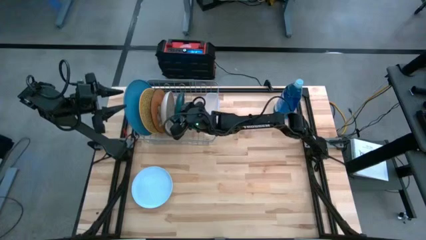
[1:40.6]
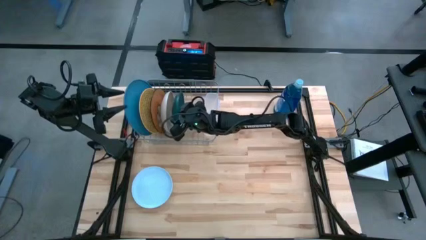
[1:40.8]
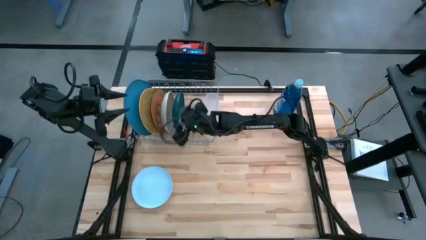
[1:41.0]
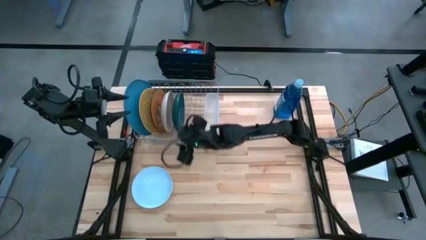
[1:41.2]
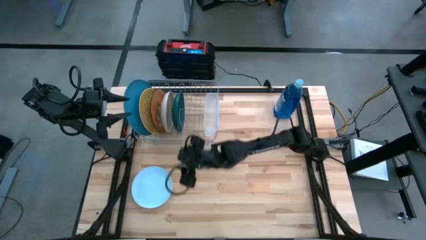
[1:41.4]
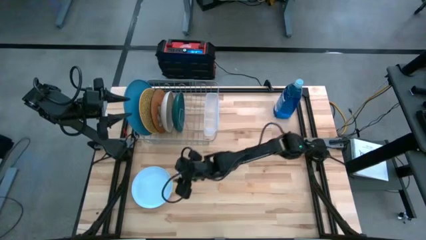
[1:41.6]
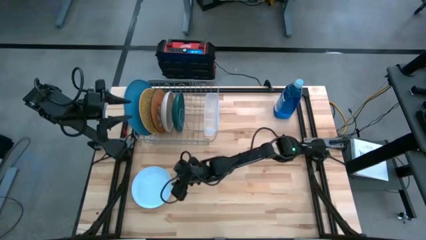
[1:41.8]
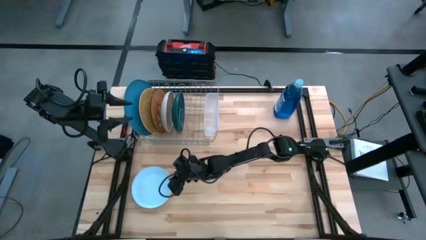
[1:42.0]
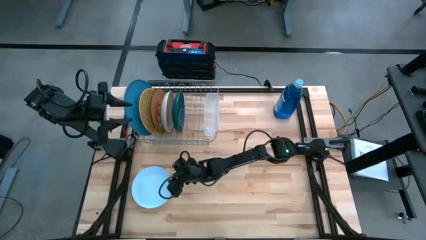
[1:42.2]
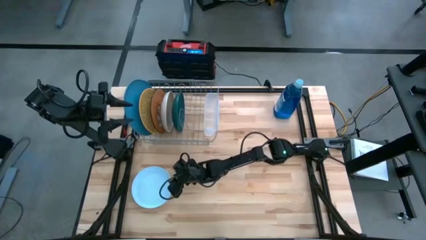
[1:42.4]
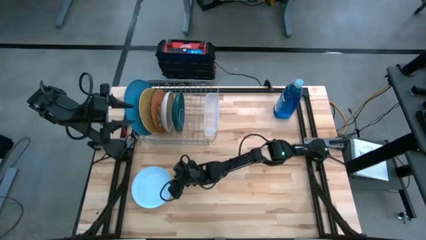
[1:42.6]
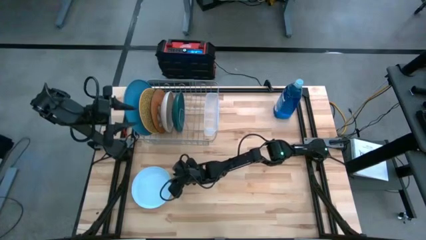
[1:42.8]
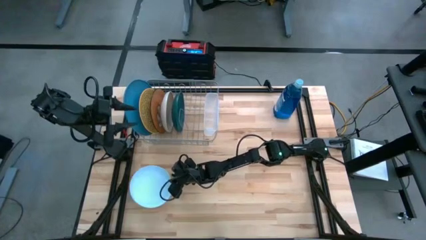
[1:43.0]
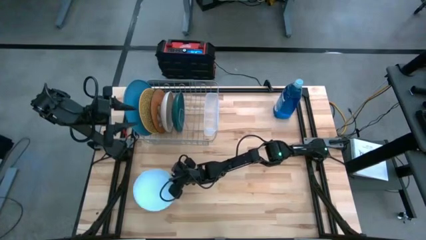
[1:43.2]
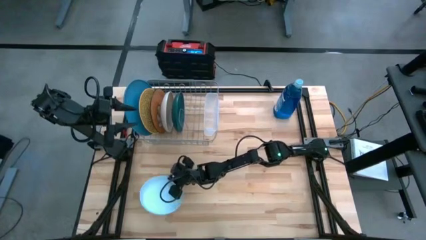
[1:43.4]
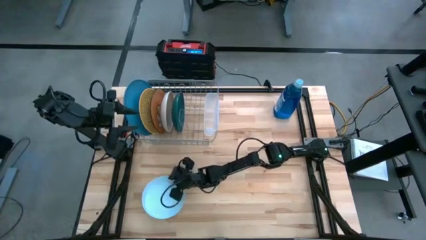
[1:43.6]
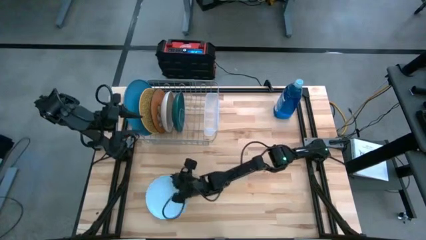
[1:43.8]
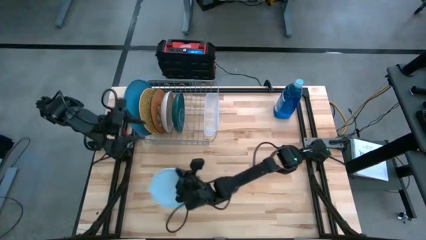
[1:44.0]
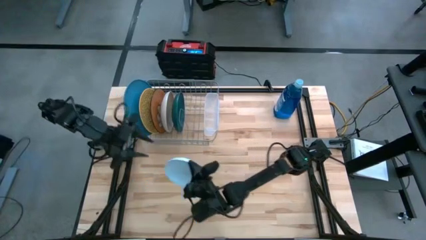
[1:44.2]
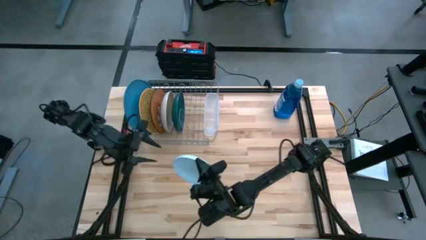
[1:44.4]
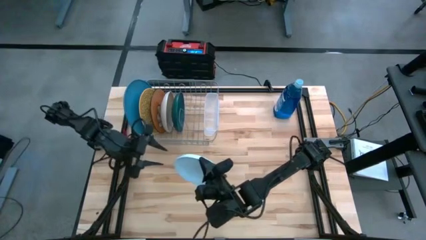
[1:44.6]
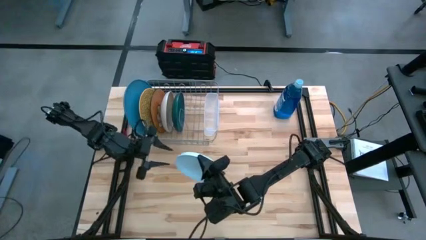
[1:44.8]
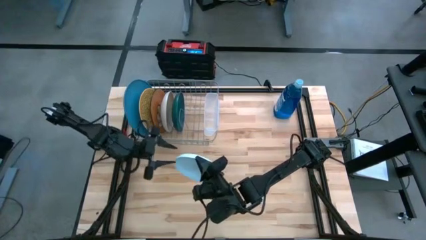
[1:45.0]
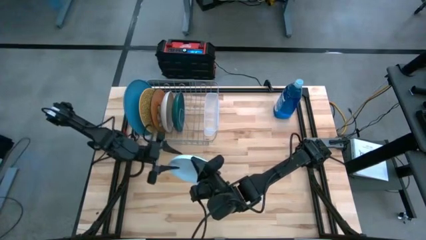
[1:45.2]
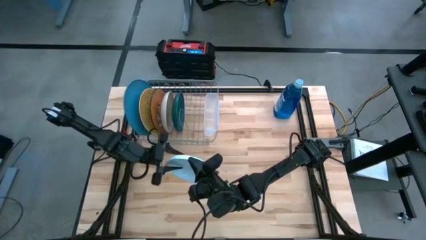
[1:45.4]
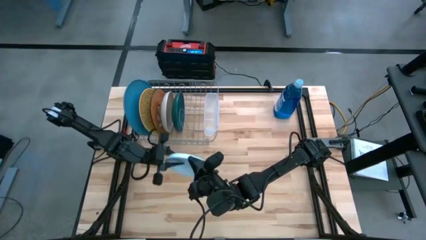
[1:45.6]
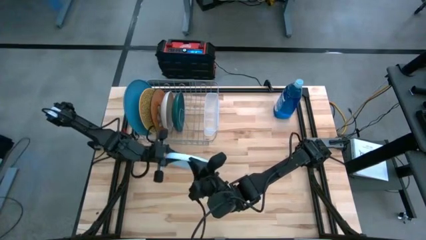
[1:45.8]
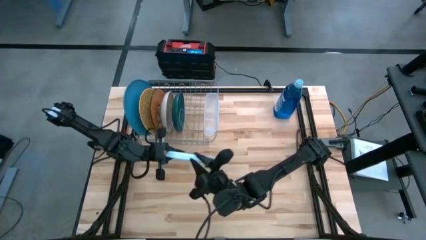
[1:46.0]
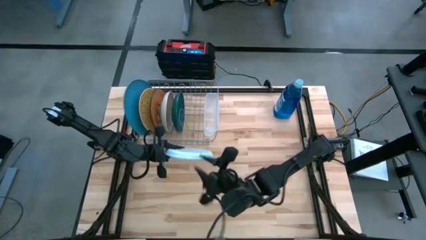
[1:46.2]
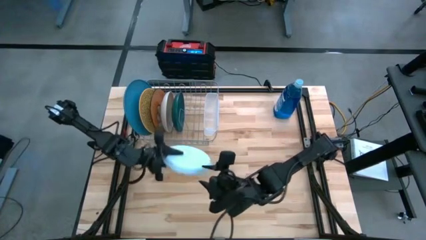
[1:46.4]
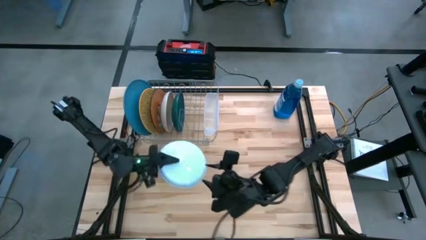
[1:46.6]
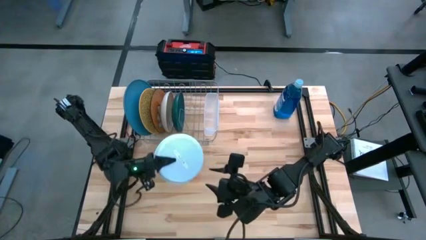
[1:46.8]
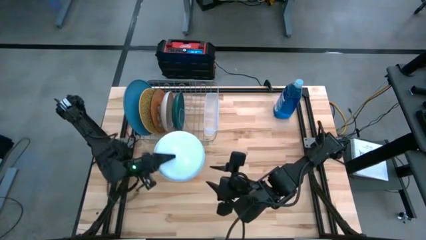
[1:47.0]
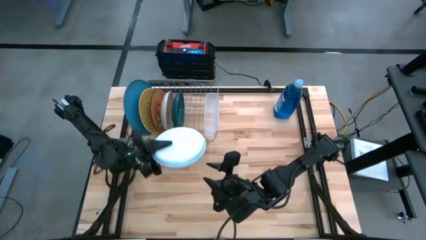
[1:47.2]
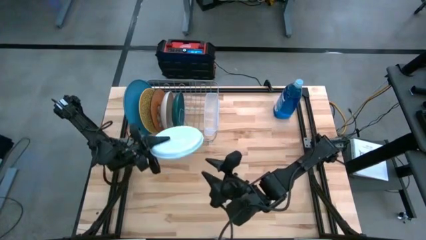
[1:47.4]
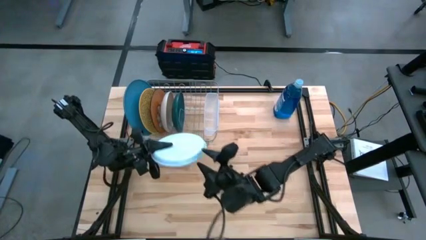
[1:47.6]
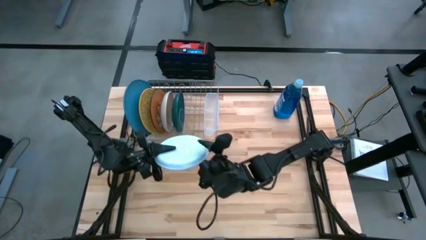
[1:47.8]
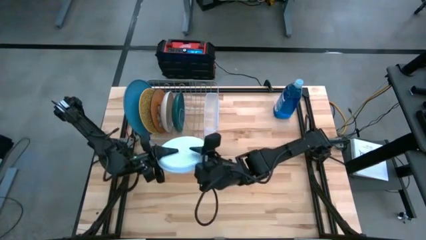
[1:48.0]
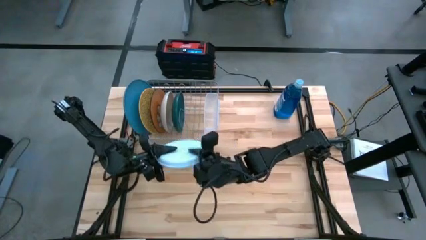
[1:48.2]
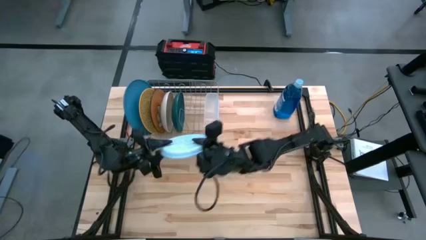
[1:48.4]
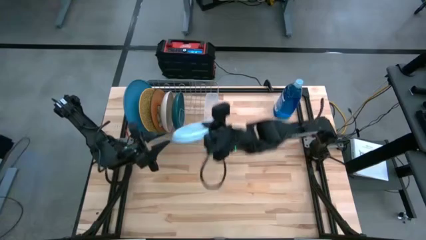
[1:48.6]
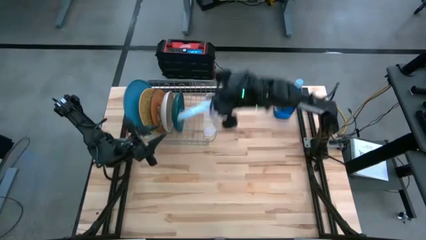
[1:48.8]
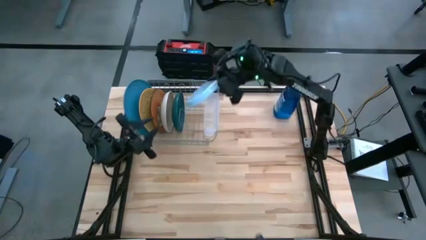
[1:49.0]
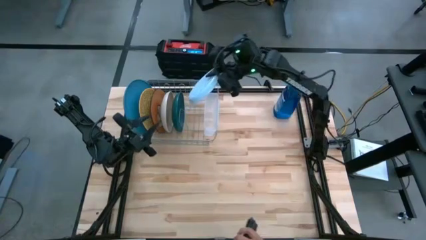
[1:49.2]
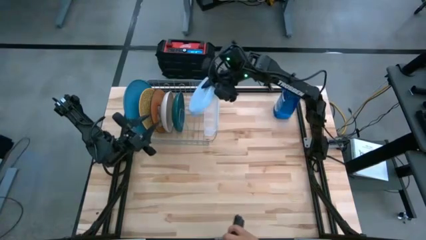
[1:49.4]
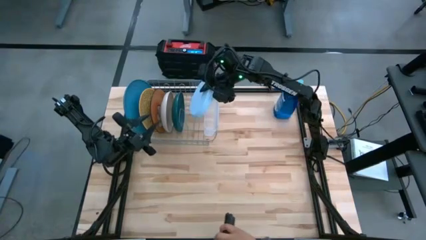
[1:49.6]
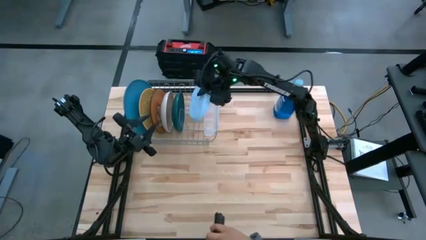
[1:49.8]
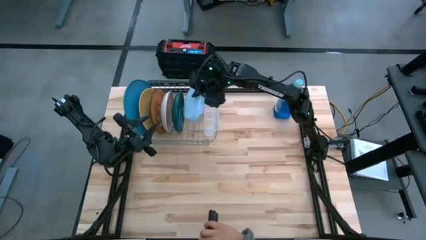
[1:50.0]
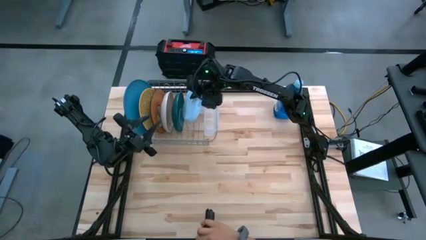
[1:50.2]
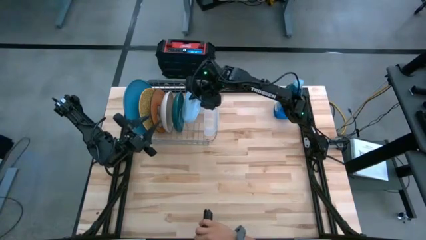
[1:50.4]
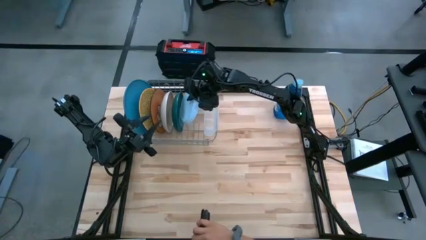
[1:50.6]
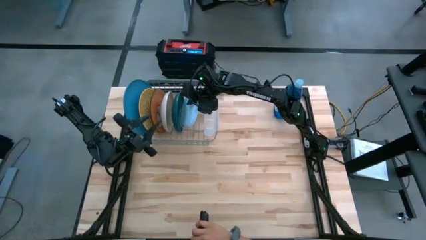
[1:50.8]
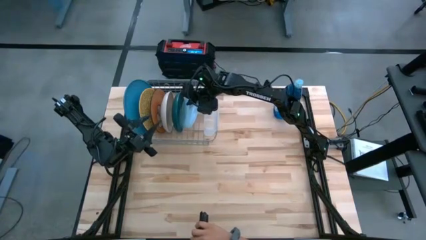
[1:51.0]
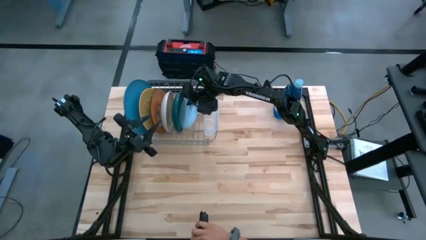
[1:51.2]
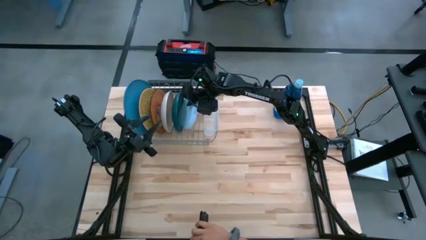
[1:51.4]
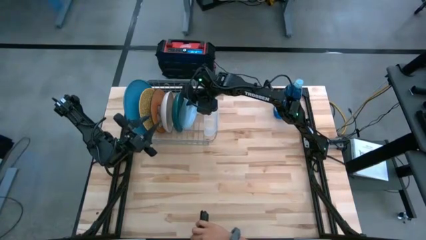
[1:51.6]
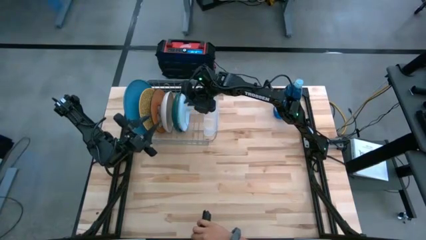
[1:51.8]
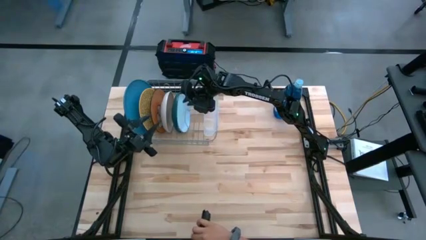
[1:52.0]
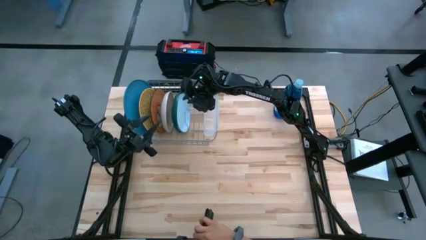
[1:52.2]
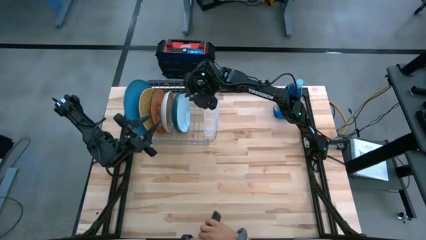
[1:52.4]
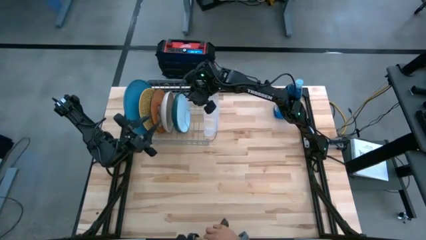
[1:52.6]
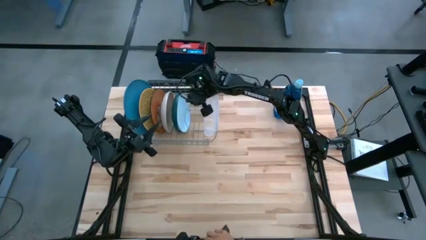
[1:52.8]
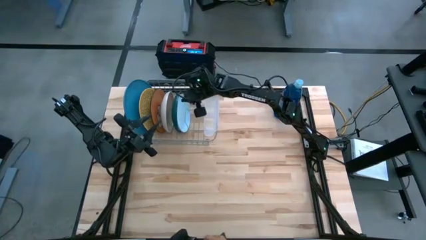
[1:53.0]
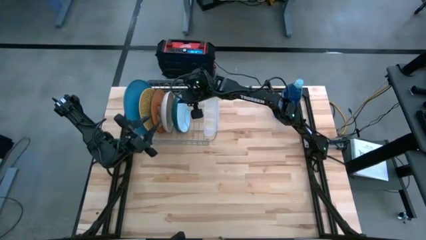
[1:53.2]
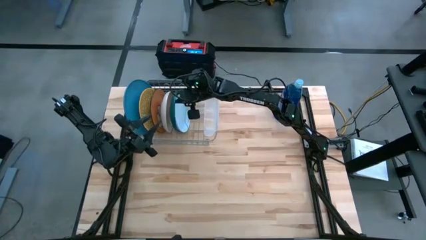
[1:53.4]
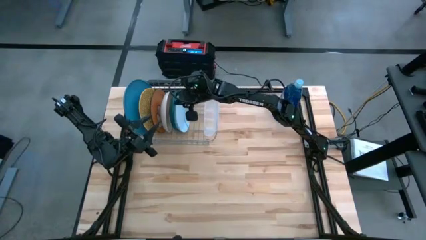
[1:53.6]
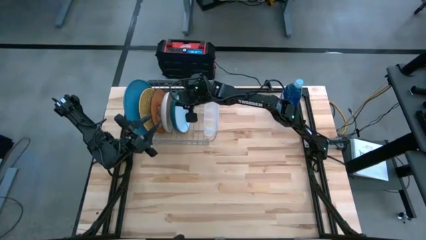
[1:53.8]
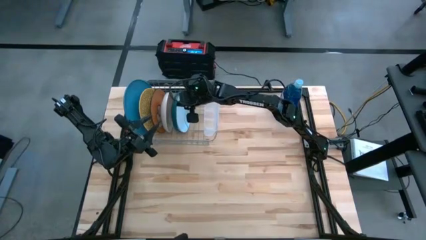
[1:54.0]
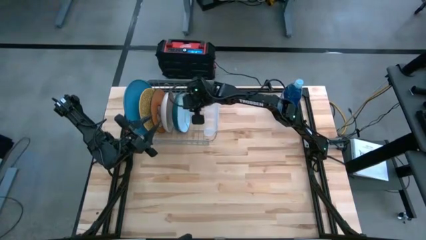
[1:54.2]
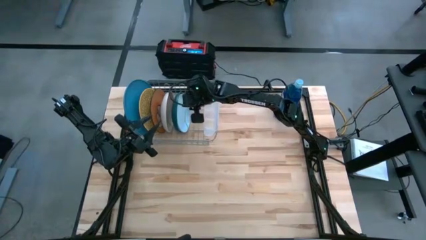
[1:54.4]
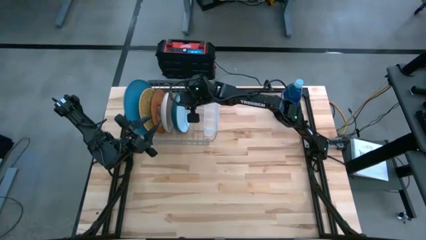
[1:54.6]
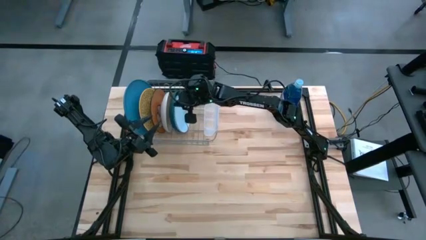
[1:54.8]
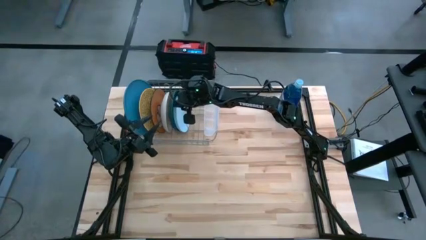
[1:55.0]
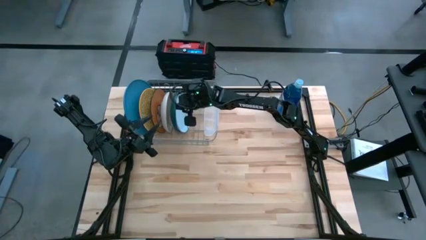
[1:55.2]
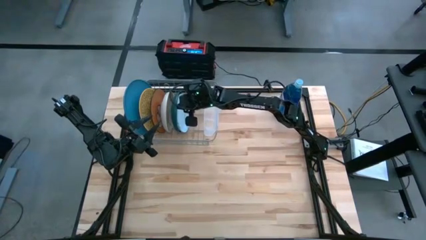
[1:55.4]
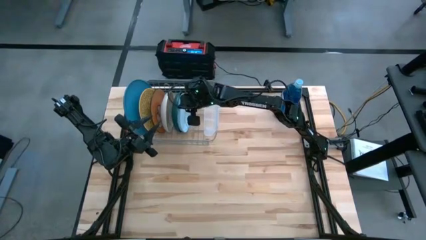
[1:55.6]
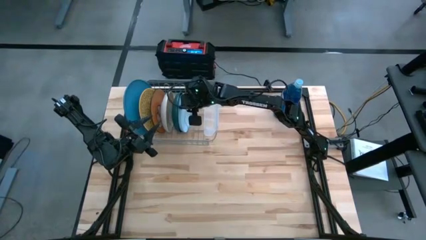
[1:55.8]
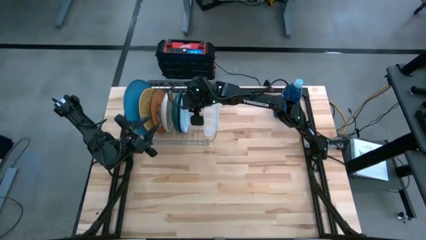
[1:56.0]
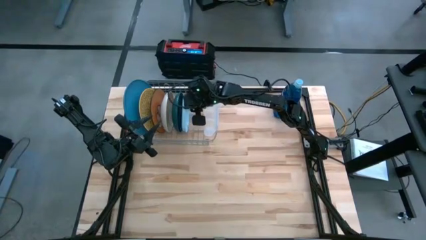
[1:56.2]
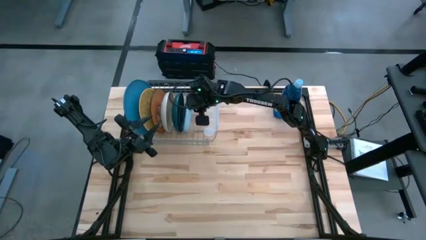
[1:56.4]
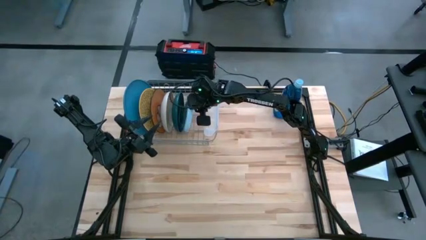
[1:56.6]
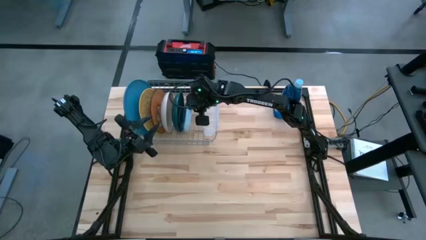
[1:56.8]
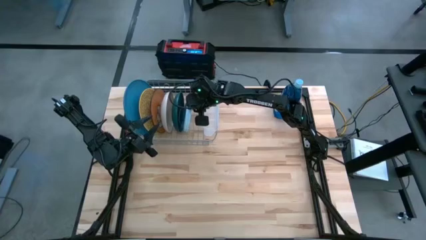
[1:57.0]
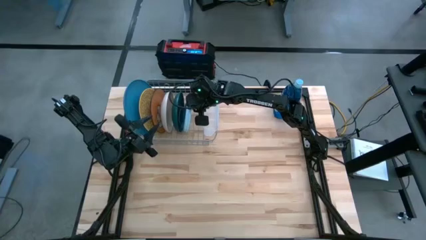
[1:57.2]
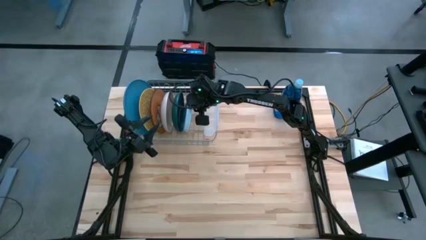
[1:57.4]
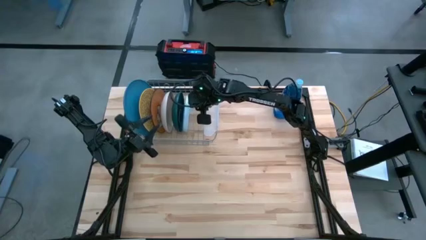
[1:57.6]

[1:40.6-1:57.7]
Task: Sort dishes
Put the white plate in the dish rack
